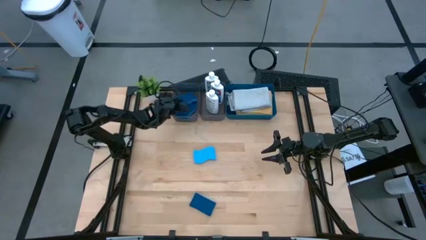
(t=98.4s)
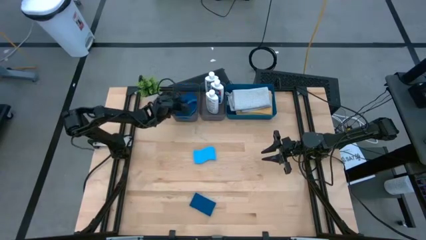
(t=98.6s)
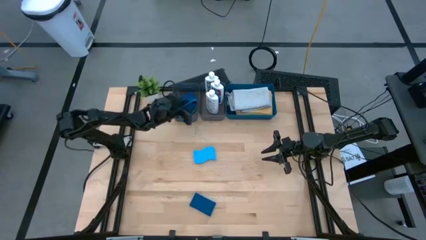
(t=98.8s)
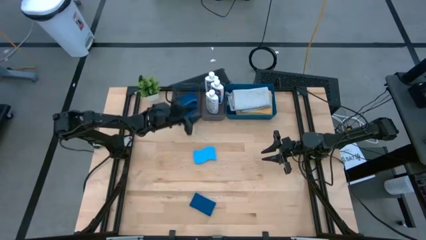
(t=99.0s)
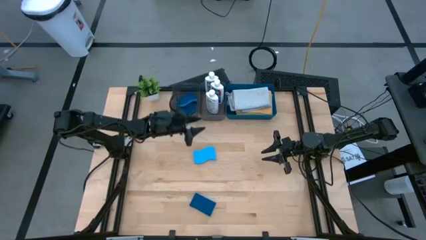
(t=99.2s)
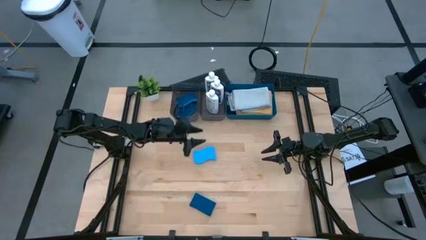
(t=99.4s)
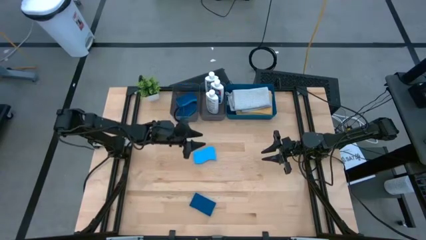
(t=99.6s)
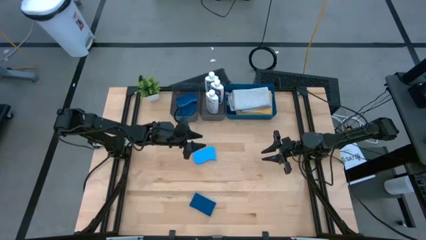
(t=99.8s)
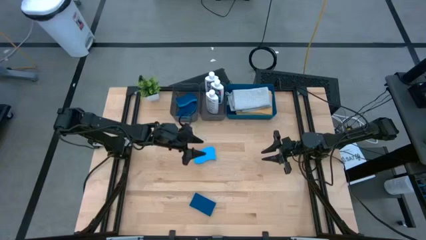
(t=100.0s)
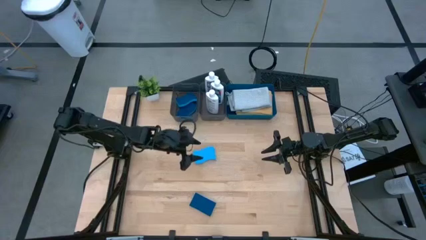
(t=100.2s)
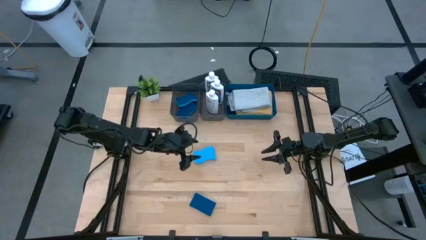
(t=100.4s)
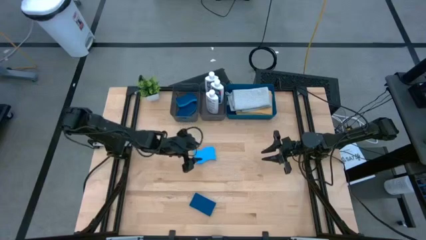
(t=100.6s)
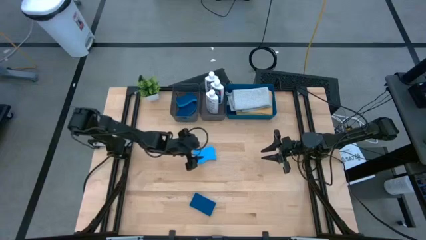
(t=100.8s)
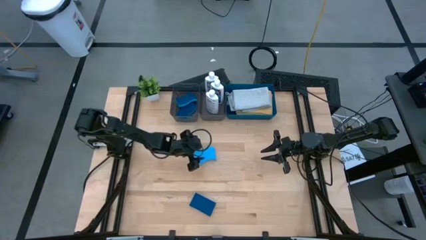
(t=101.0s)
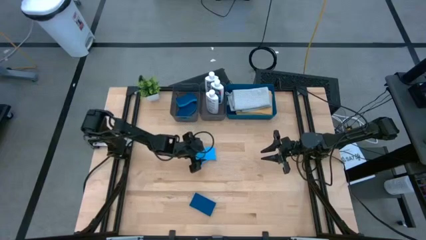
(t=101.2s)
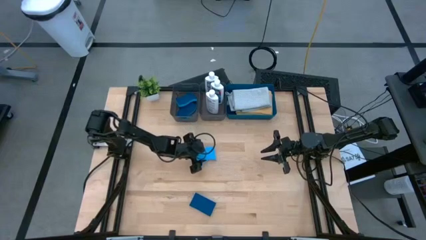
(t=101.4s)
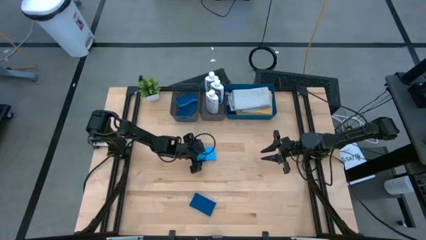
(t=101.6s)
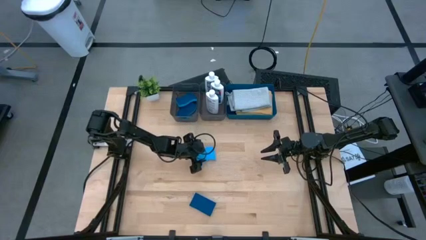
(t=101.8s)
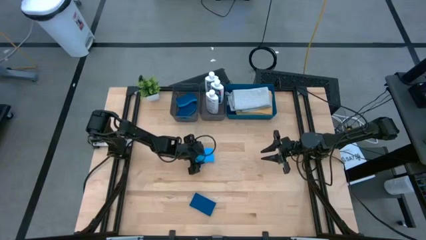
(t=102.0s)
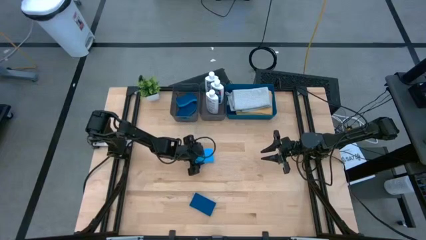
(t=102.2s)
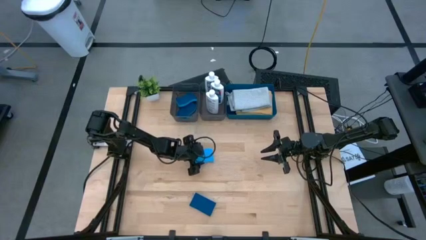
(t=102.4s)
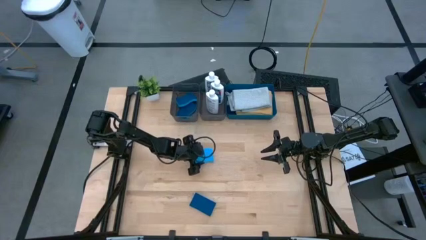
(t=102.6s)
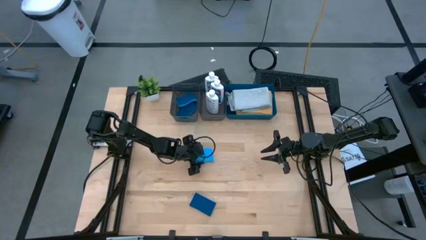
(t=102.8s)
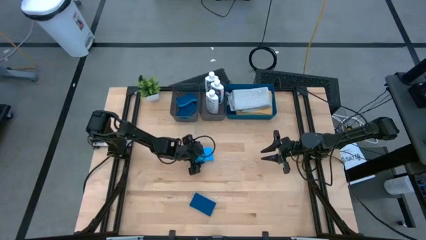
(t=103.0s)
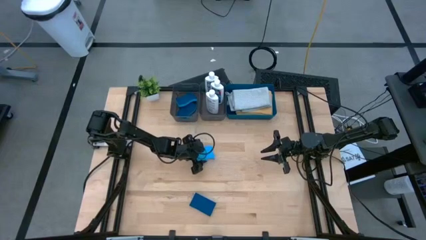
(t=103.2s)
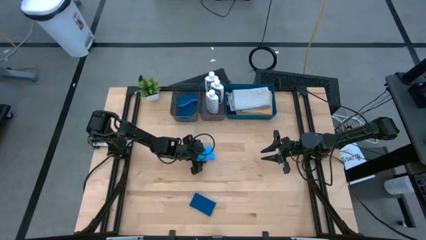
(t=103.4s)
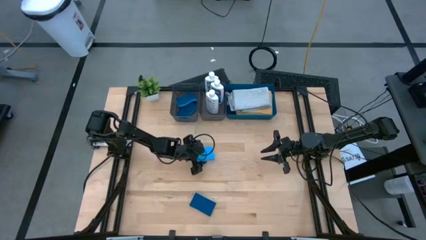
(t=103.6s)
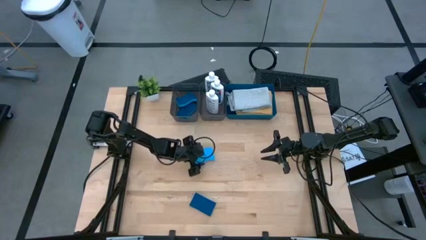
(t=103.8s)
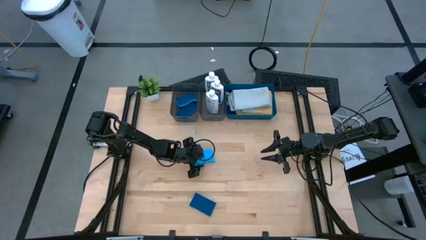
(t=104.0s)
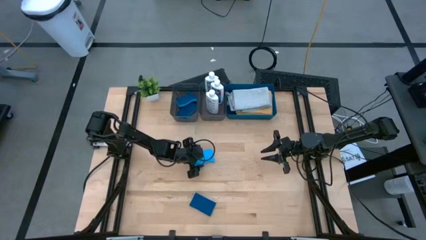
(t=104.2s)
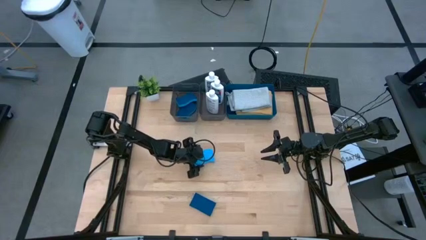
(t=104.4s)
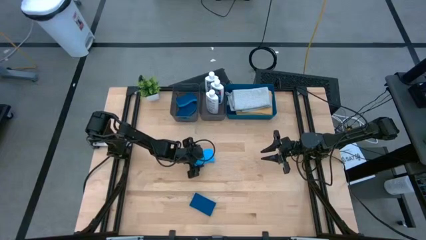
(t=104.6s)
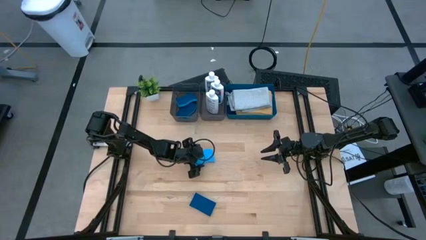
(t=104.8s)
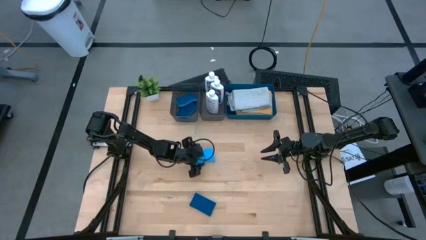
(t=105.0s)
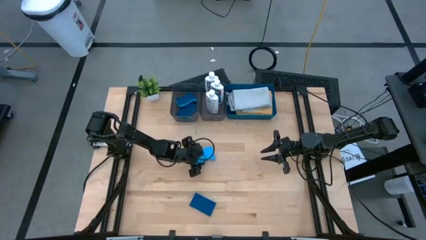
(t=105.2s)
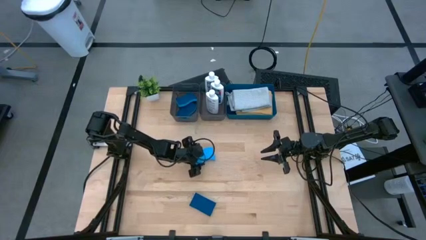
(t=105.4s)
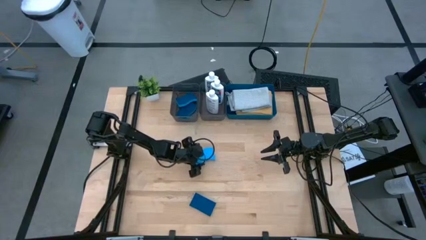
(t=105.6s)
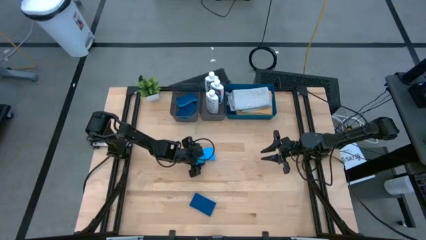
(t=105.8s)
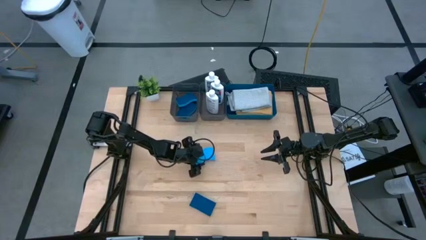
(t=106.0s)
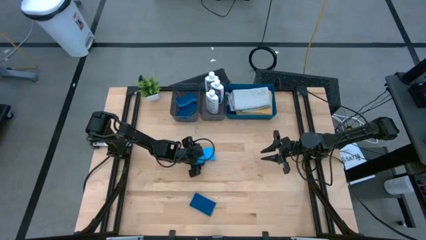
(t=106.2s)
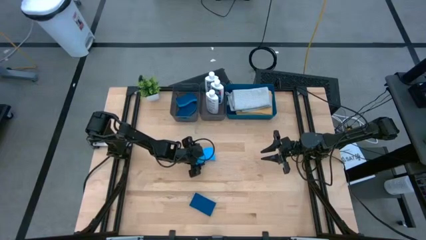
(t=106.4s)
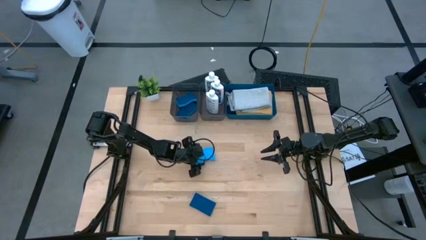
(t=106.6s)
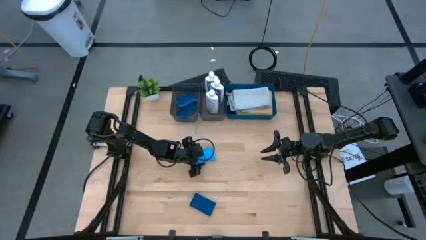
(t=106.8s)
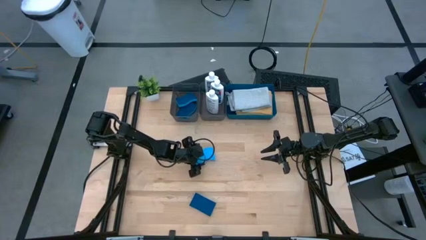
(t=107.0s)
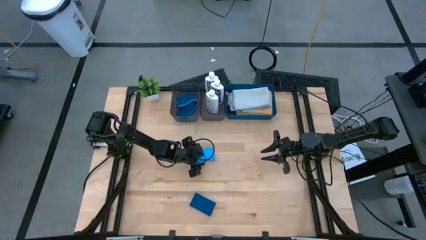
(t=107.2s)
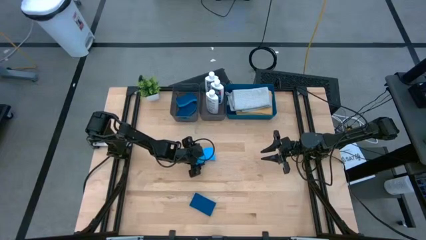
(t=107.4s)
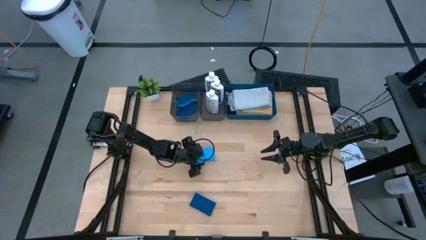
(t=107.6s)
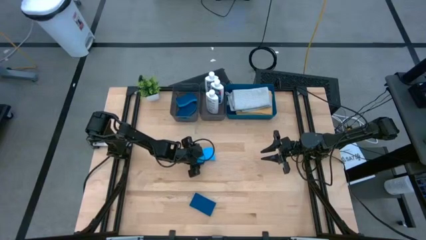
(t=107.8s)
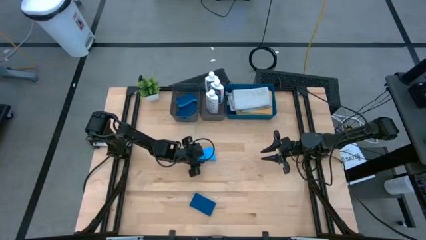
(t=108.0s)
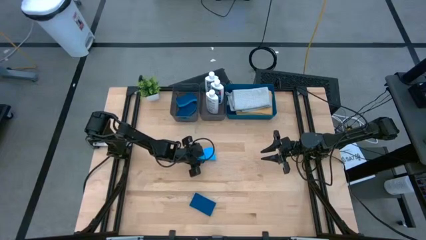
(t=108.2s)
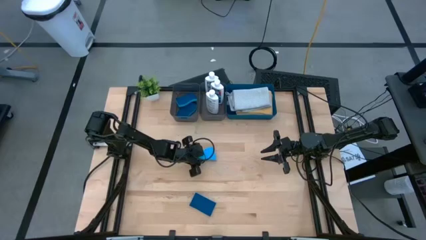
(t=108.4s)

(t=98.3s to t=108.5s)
Task: Pick & Place Kitchen Items
Put the light blue sponge into the left black bin
